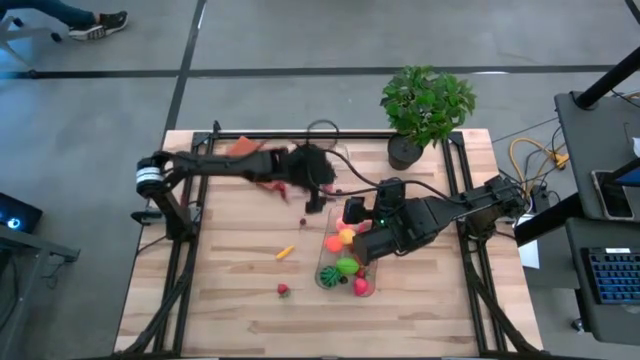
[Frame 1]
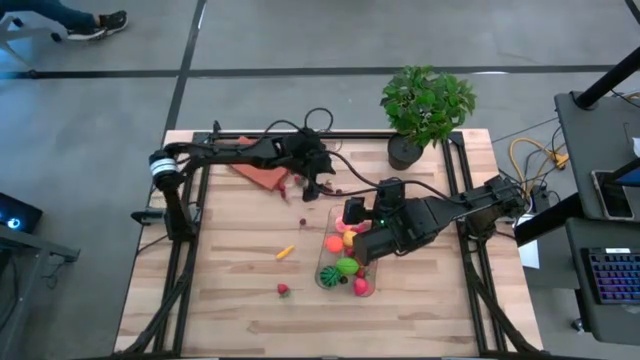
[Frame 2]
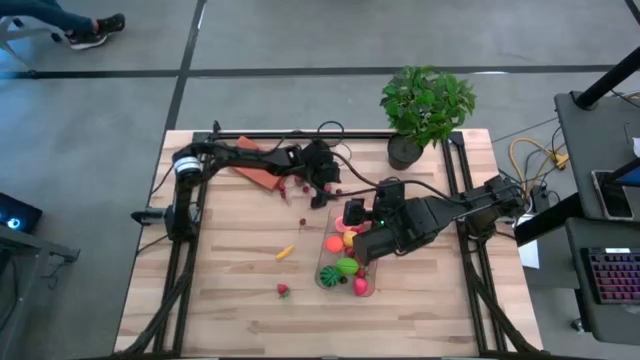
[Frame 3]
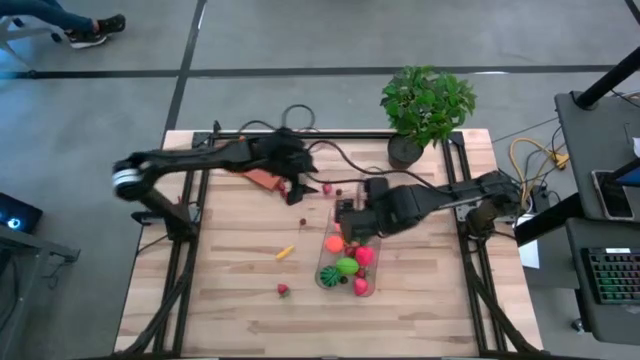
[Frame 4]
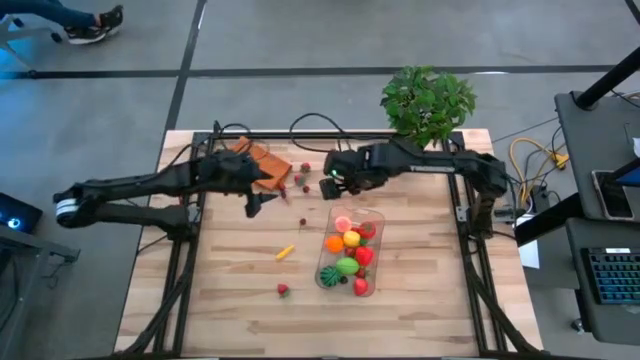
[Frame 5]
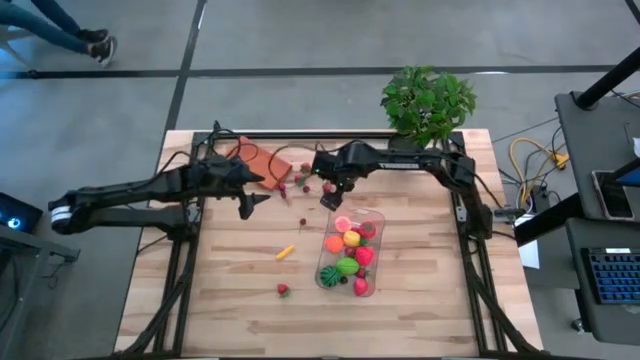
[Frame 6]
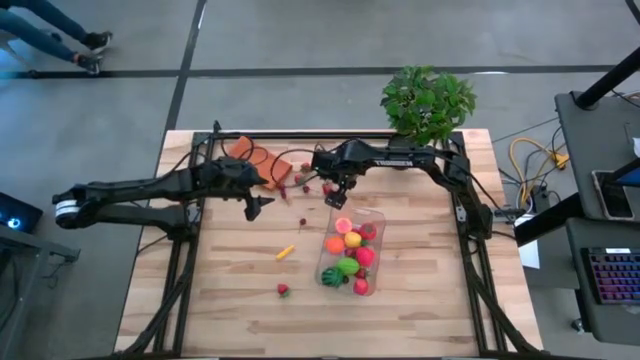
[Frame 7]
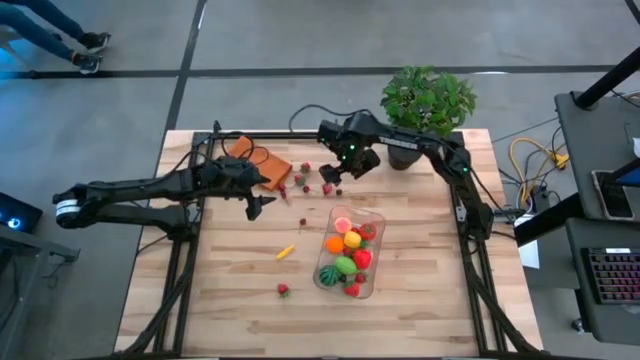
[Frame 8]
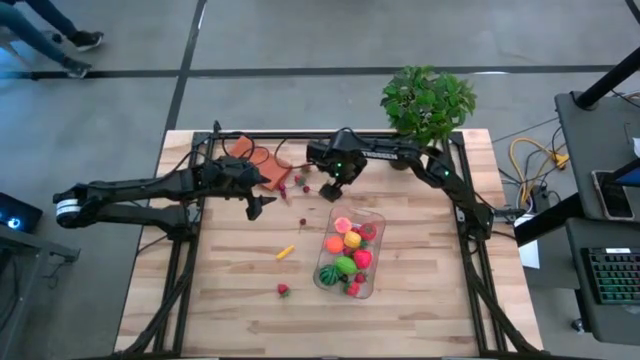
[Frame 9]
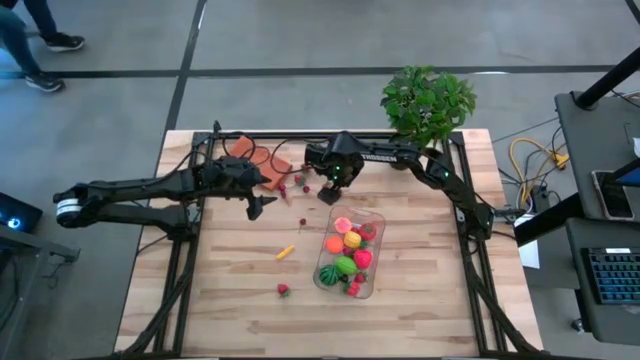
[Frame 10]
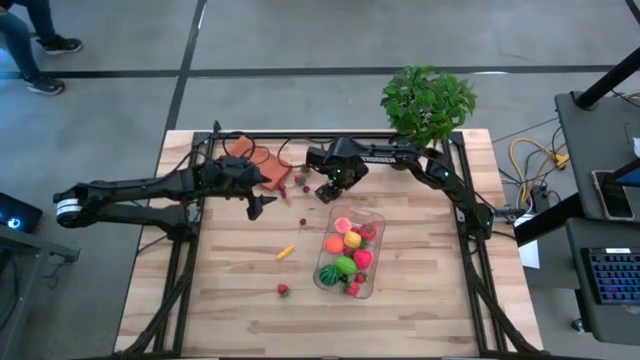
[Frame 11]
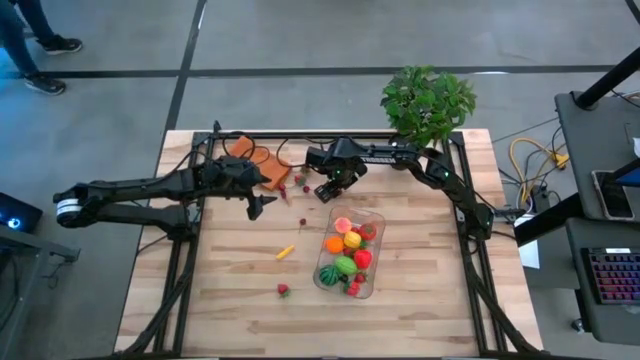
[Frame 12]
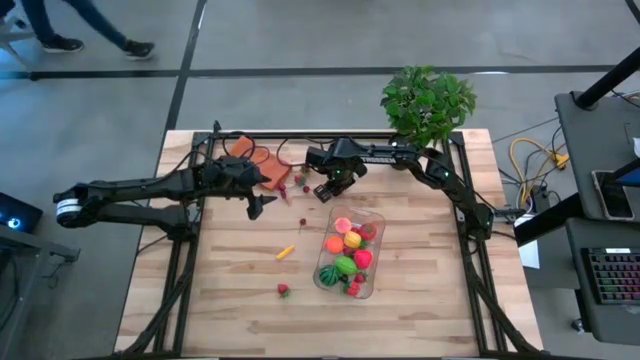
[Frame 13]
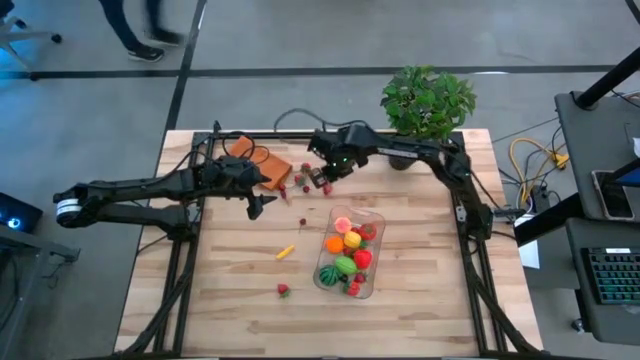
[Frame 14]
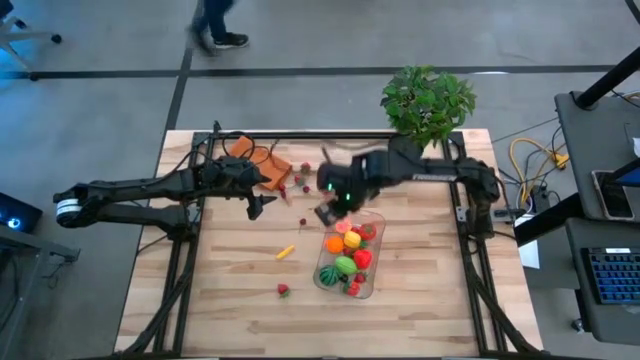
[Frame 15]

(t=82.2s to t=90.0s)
Task: Pick and placing Produce into tupperware
Put the cherry into the transparent bin

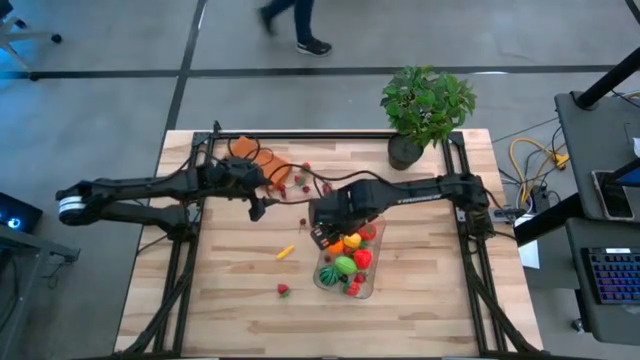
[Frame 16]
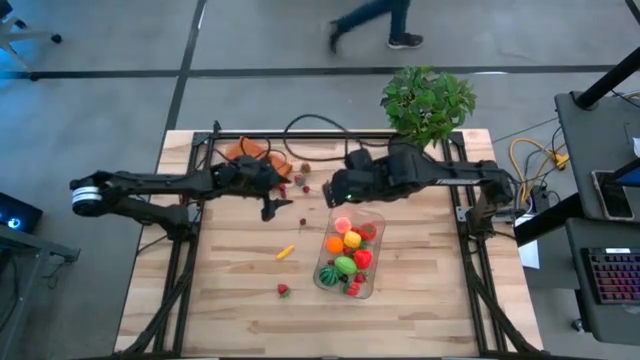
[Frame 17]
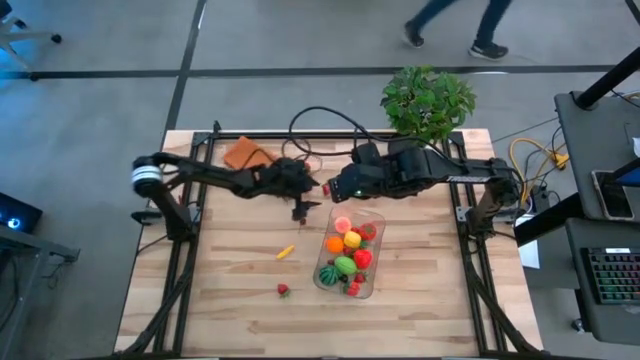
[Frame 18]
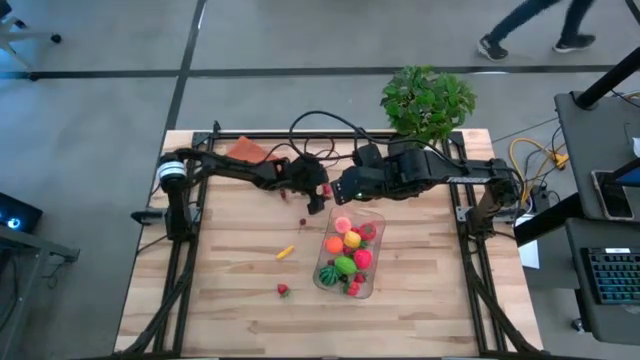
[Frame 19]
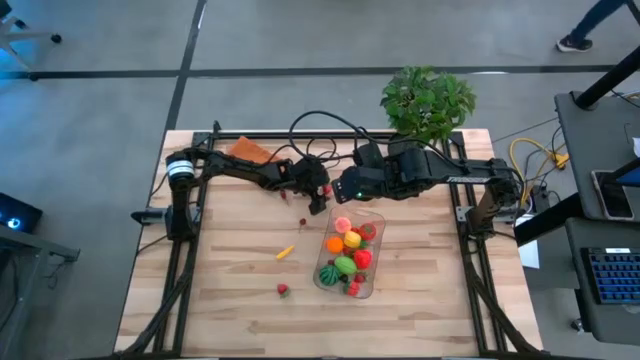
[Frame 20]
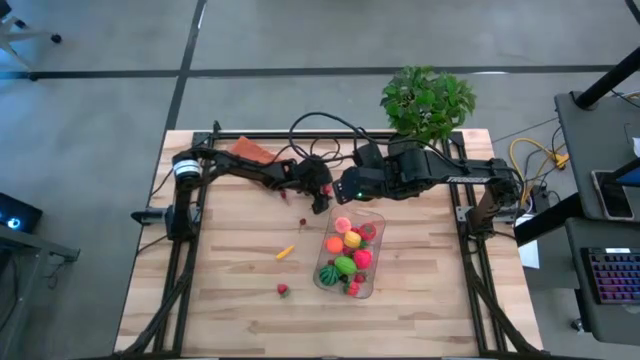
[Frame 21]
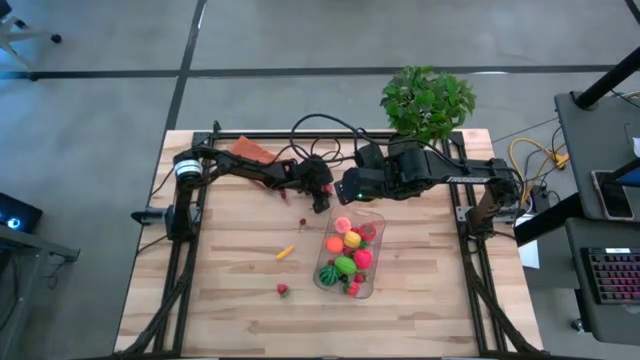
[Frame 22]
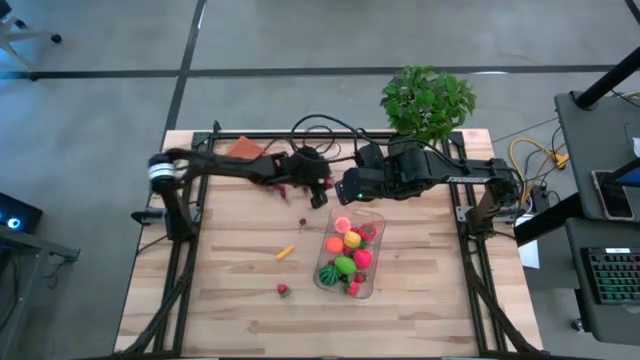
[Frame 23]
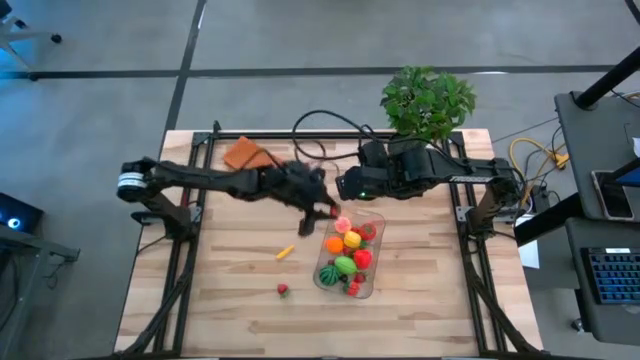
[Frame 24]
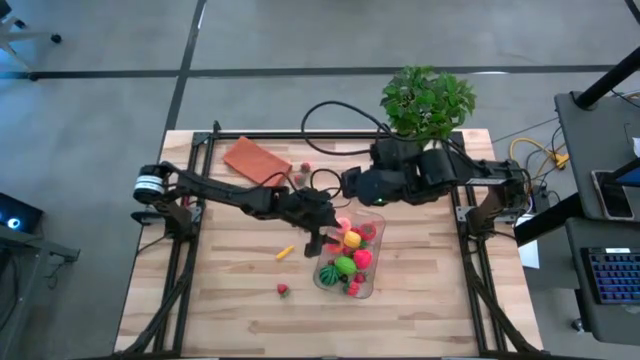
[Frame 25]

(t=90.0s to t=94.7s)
Put the strawberry into the transparent bin

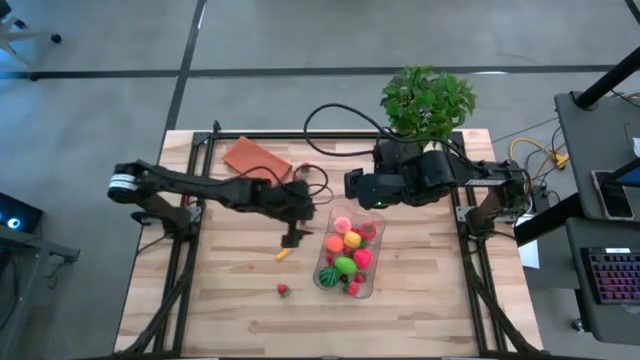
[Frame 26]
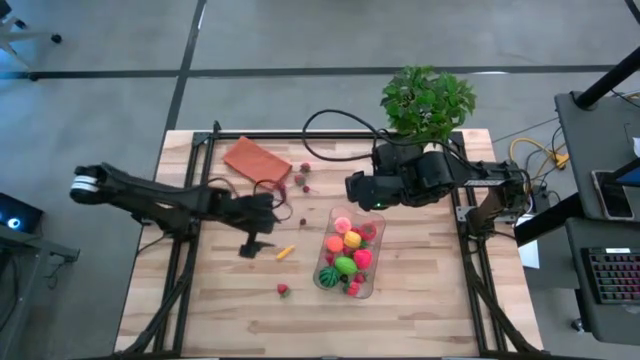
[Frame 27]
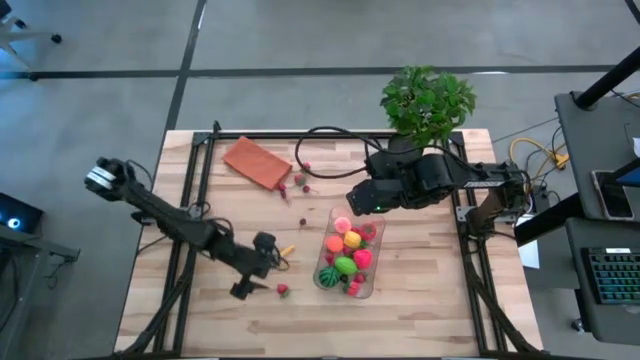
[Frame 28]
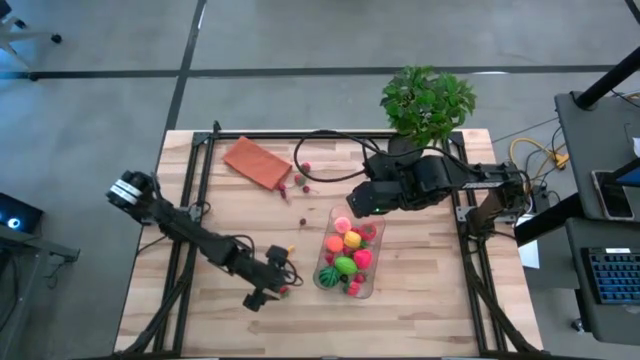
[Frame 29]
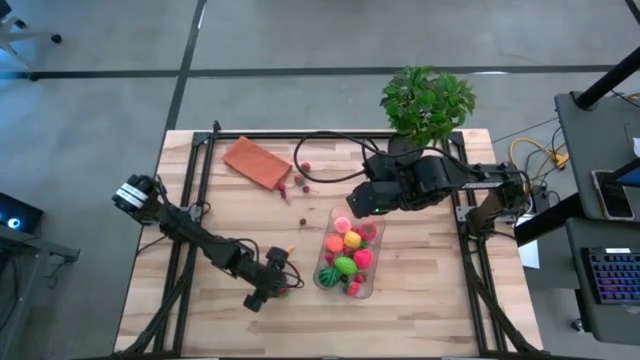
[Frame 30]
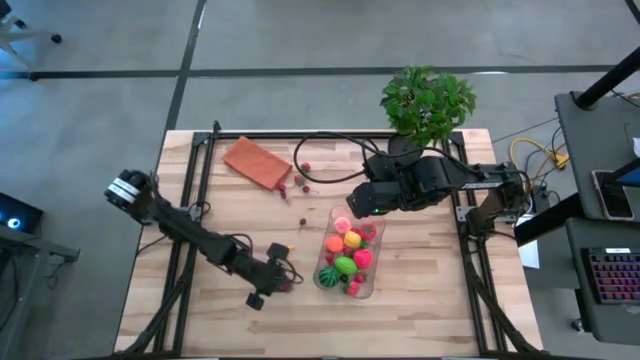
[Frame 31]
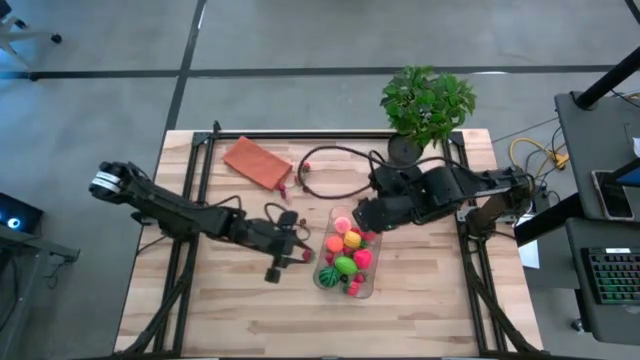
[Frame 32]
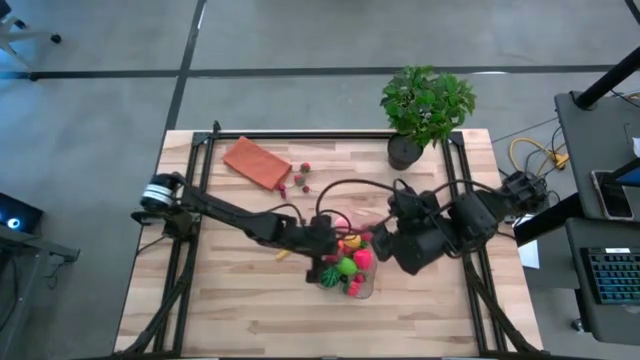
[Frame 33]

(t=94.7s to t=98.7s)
Put the strawberry into the transparent bin

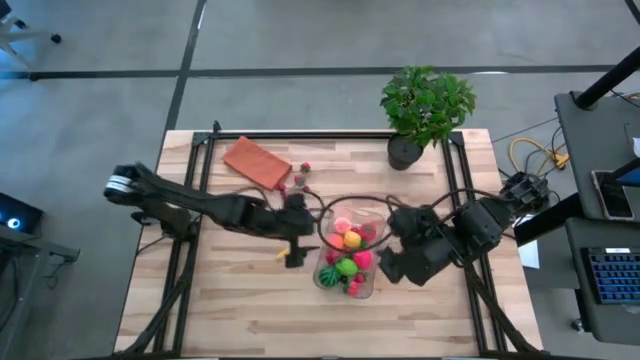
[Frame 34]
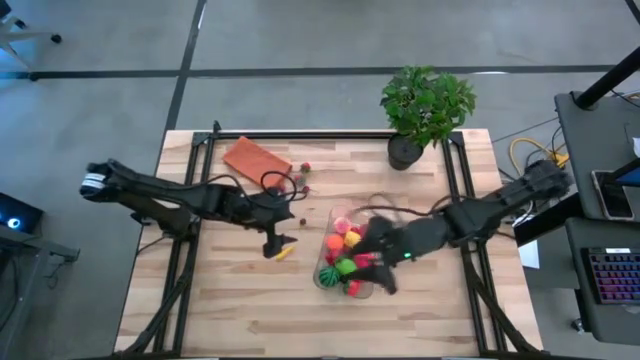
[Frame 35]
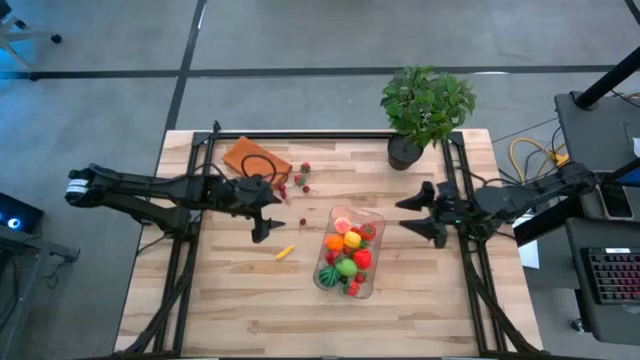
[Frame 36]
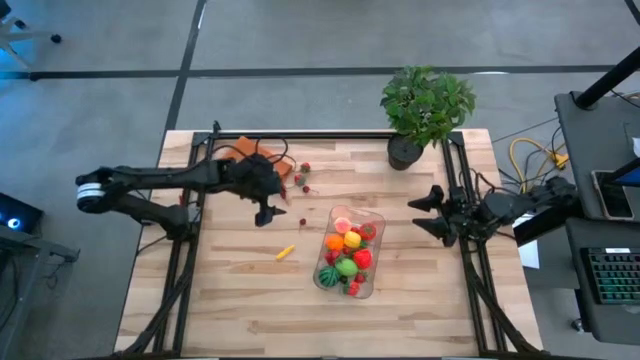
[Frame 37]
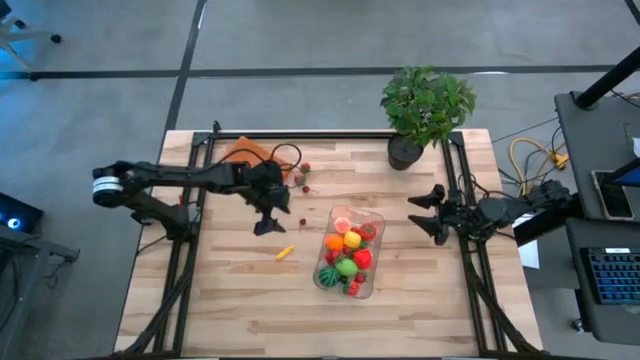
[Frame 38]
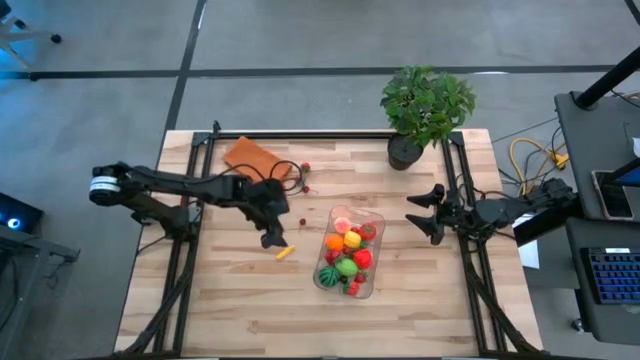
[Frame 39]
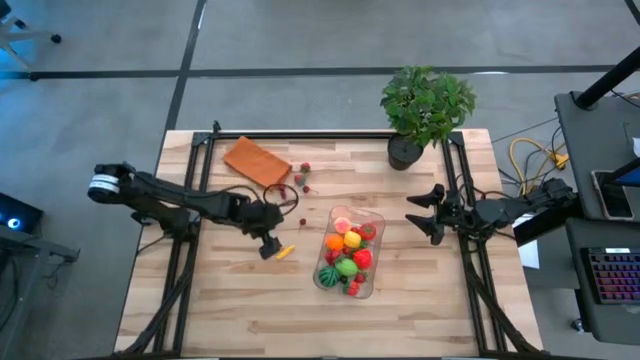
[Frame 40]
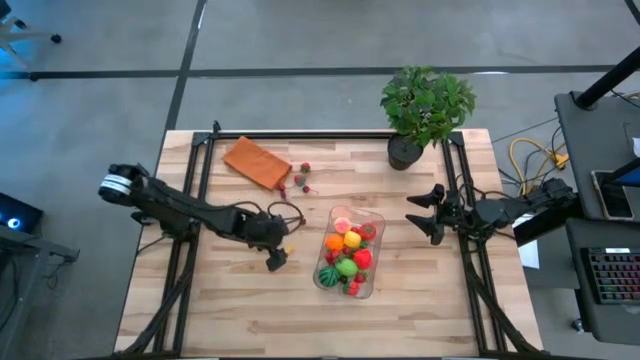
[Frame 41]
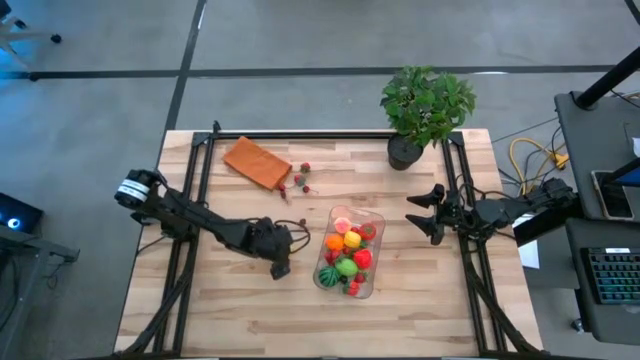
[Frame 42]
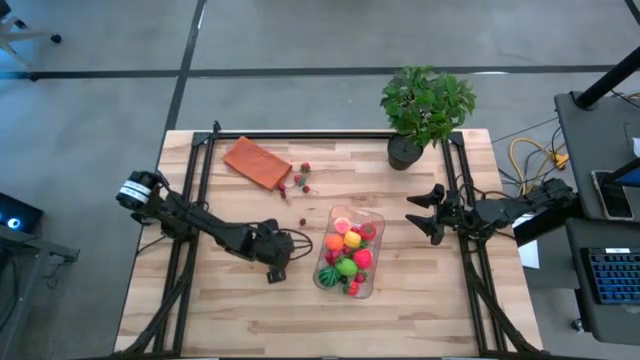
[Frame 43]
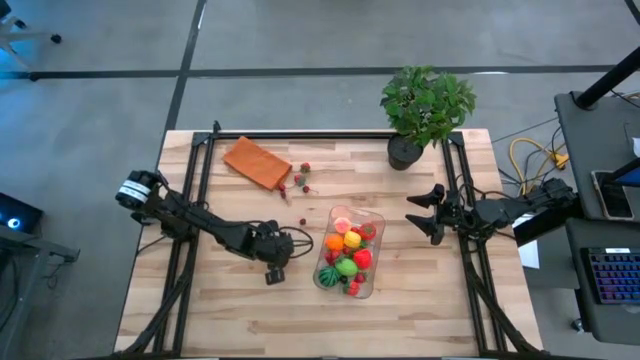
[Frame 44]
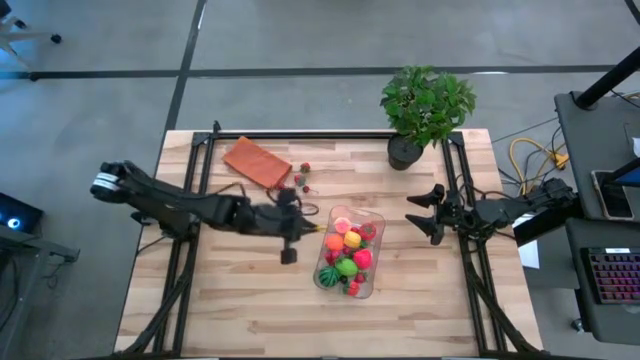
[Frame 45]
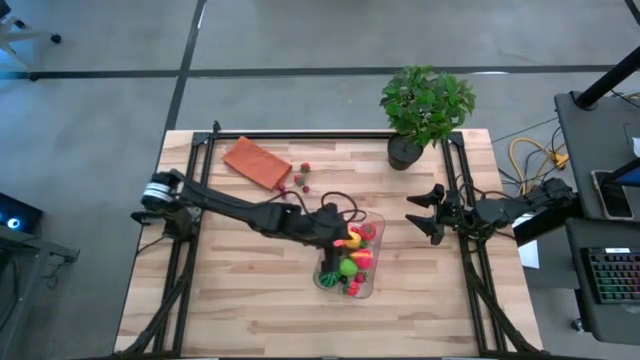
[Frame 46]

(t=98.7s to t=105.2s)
Put the bell pepper into the transparent bin
